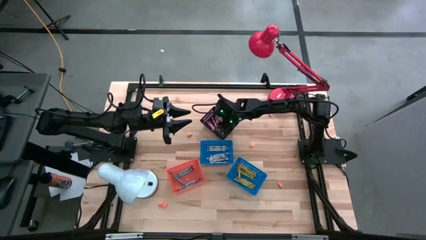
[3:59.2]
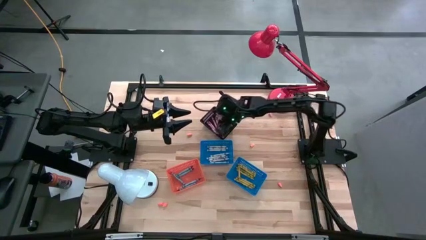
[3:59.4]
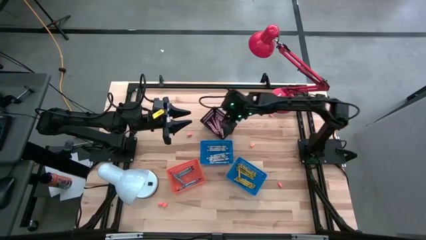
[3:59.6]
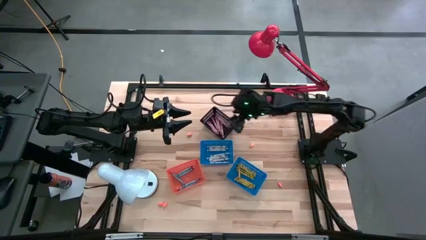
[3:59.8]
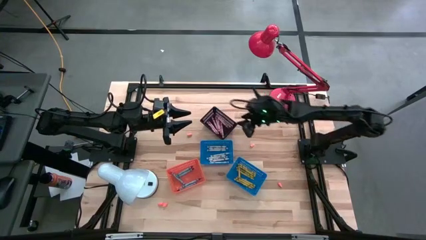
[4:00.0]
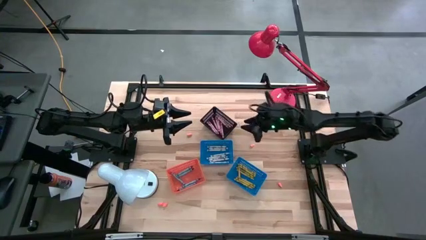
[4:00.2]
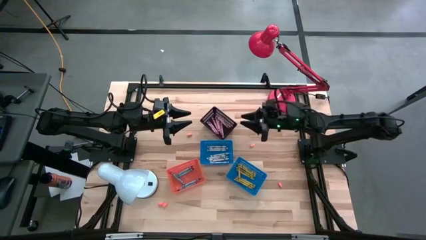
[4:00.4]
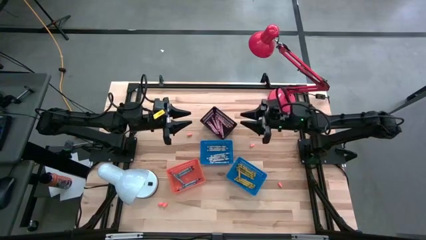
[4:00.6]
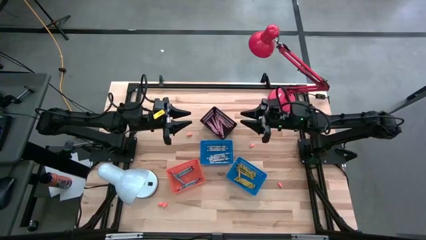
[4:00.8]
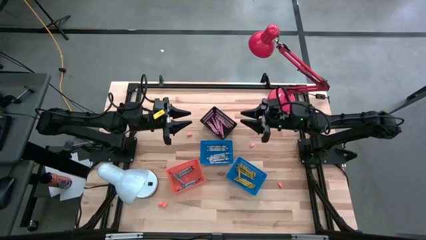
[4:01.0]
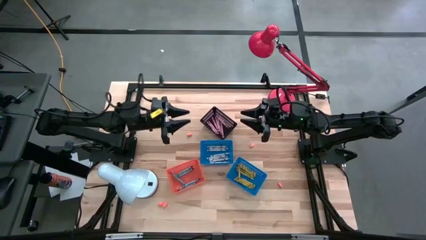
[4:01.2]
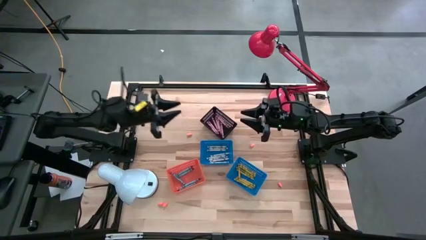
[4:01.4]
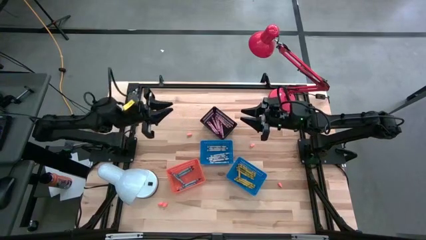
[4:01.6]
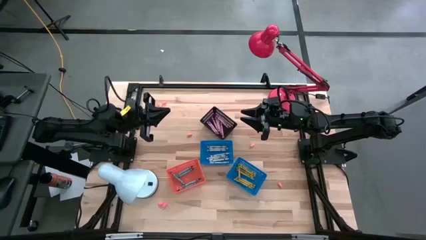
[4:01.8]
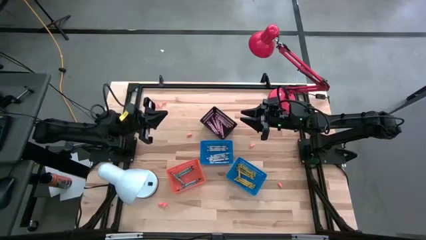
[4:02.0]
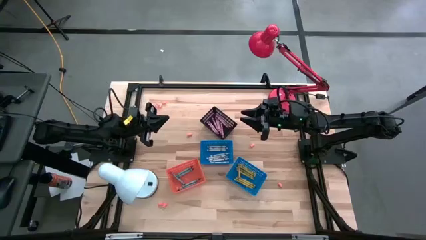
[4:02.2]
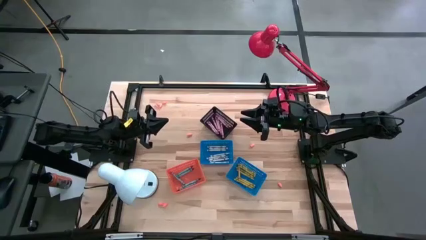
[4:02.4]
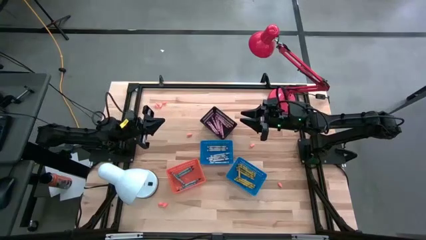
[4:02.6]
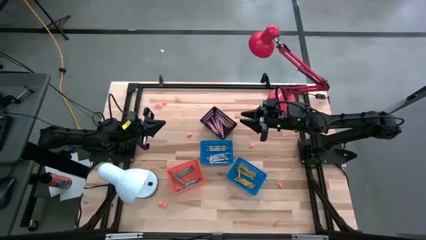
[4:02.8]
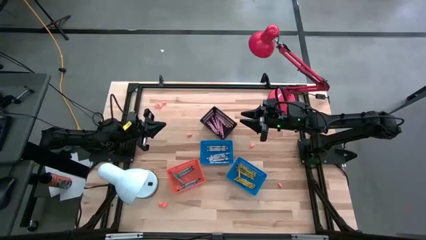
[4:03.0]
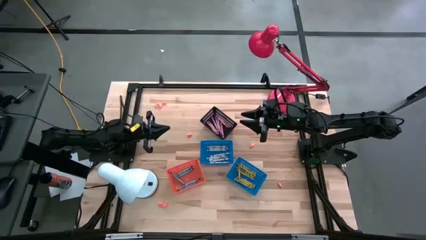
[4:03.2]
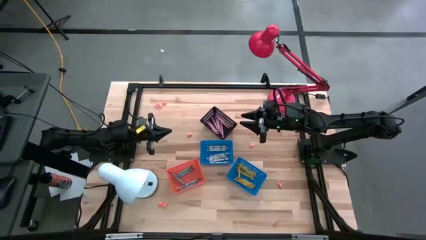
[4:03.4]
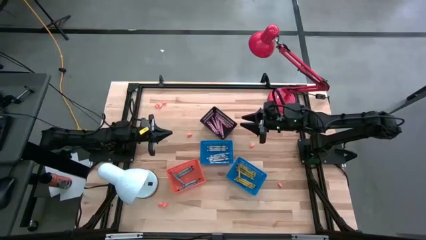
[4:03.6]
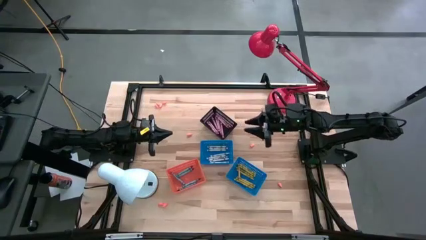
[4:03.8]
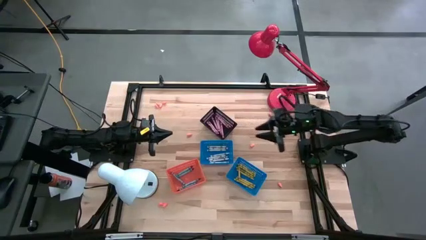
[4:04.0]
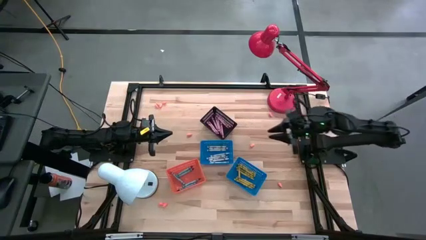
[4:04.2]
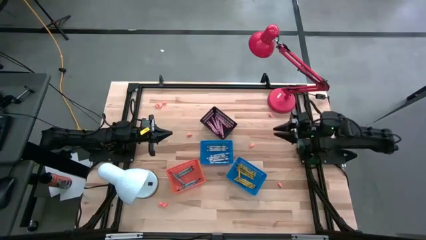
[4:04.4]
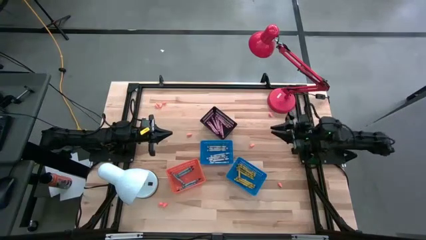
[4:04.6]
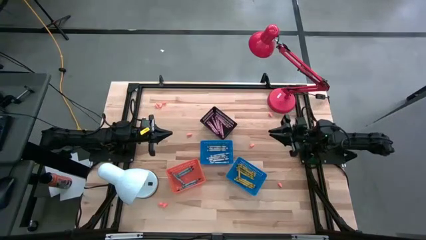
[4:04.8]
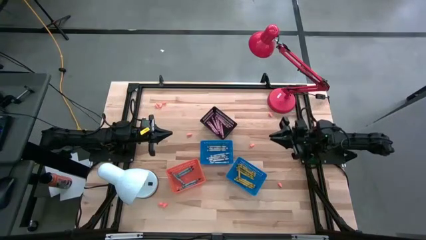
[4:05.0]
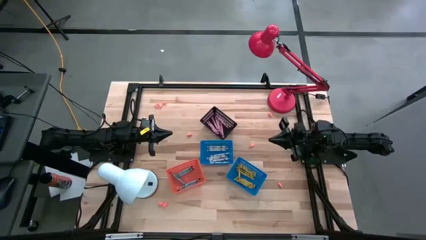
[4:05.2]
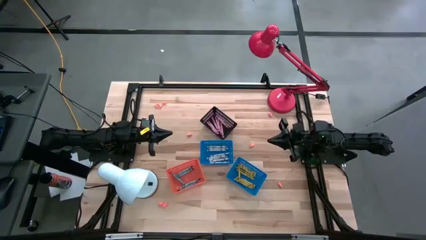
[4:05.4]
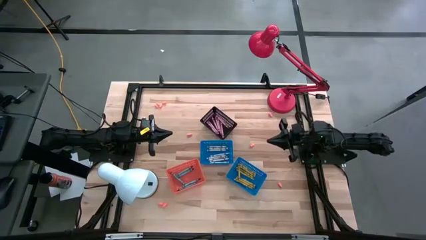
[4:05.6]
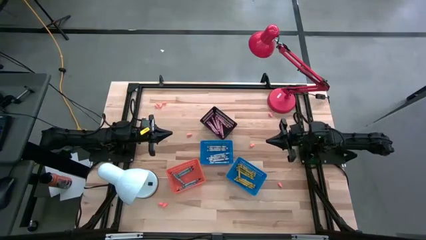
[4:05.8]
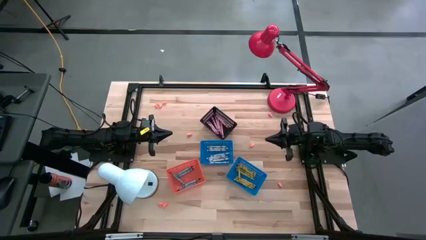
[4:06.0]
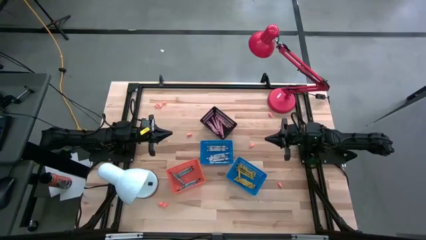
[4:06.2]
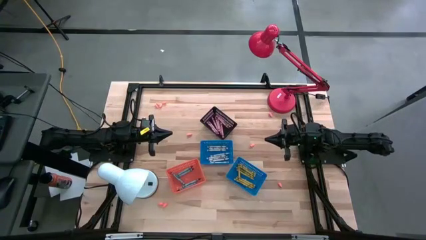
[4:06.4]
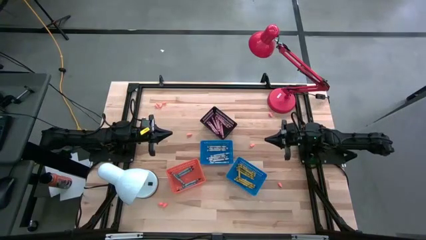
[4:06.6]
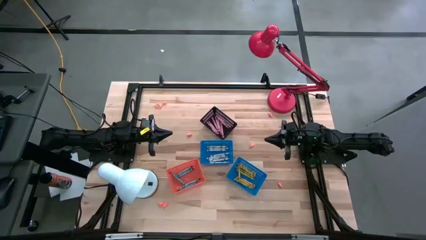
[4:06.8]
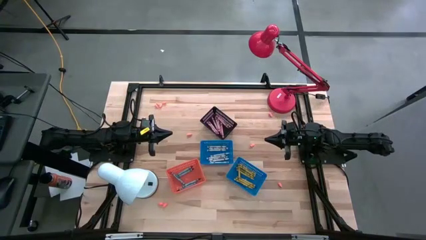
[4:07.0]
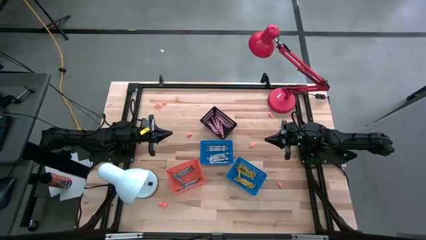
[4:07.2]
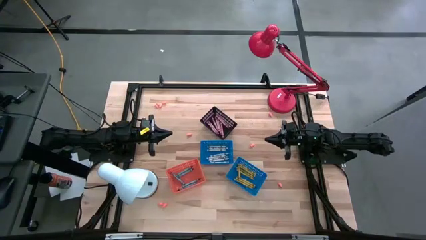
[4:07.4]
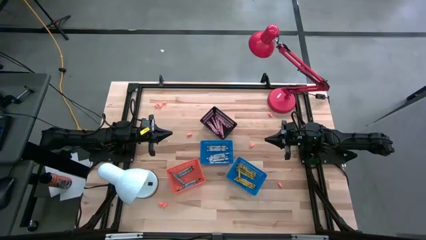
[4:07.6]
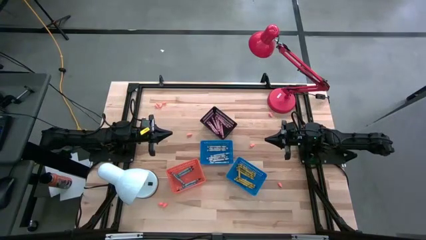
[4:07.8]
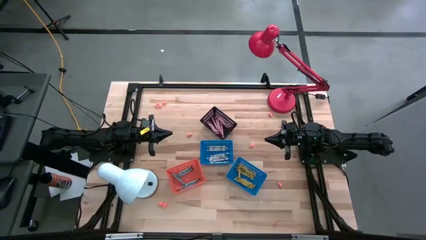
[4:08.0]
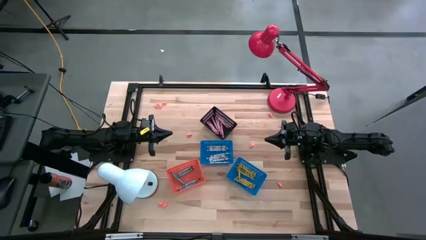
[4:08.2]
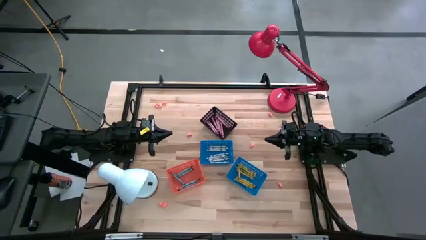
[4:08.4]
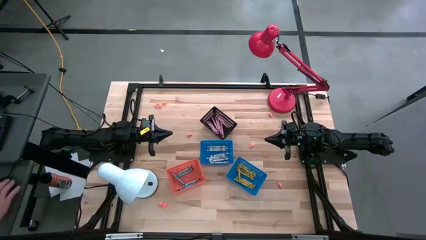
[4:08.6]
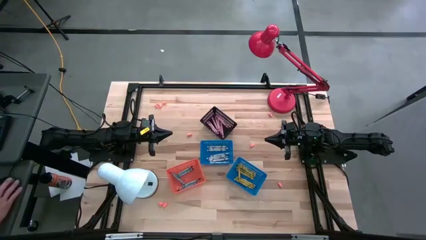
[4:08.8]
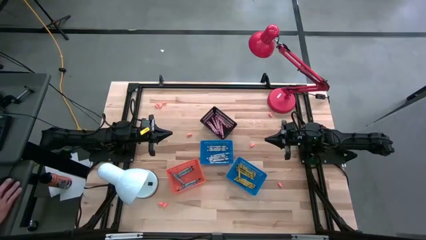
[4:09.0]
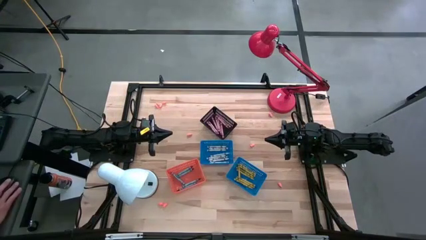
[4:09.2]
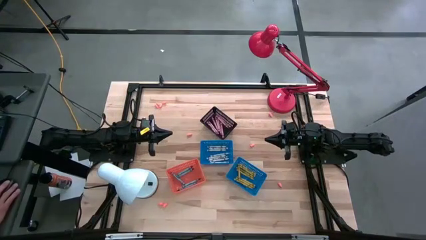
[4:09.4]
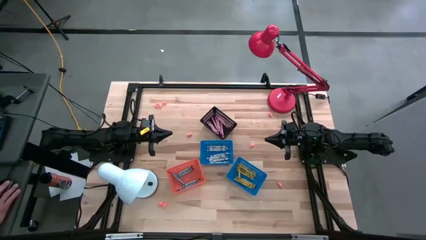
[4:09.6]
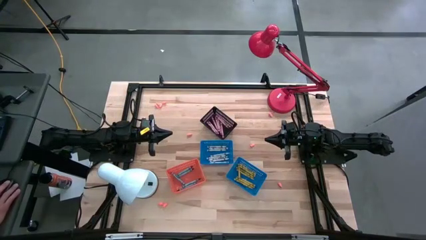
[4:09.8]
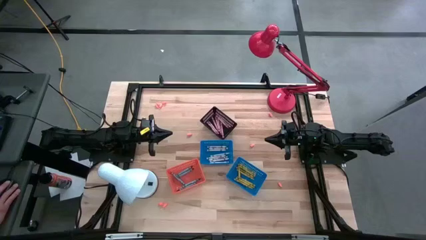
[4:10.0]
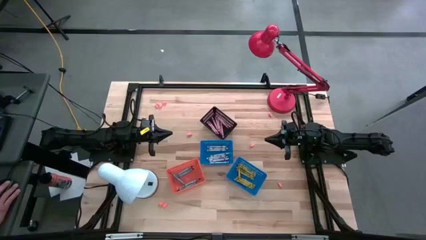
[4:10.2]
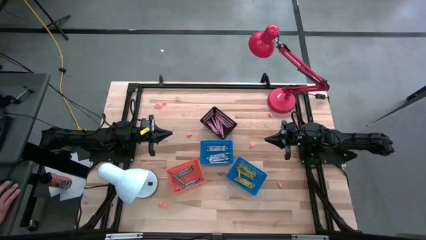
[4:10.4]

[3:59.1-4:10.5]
Task: Sort crayons
Return to Home Position

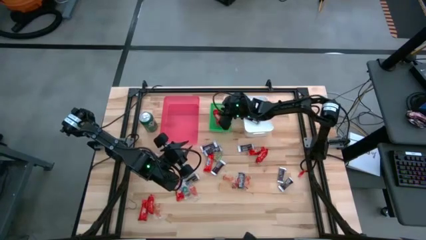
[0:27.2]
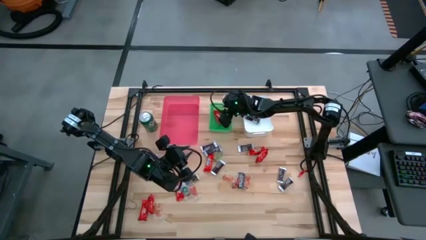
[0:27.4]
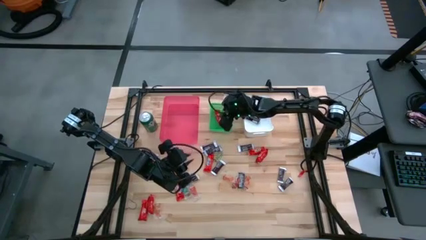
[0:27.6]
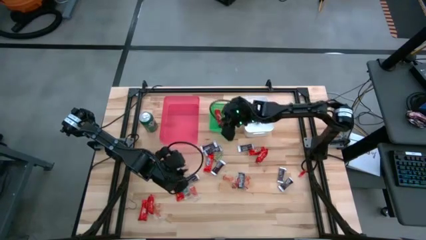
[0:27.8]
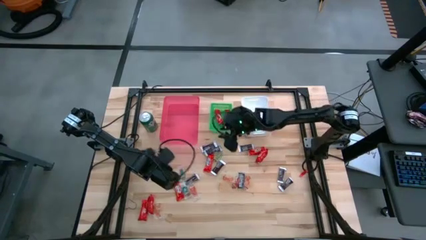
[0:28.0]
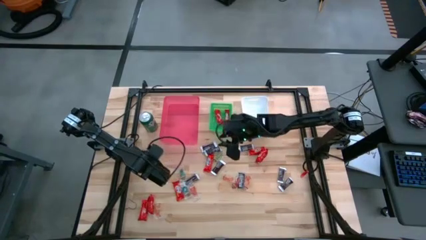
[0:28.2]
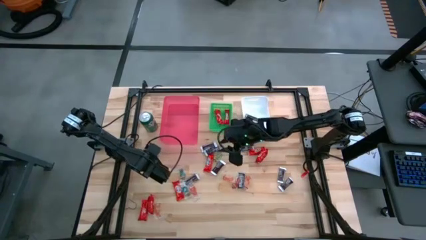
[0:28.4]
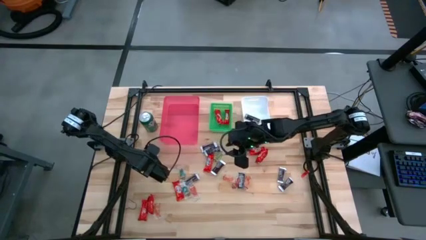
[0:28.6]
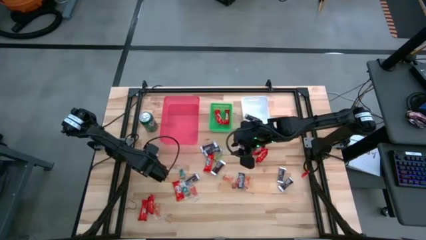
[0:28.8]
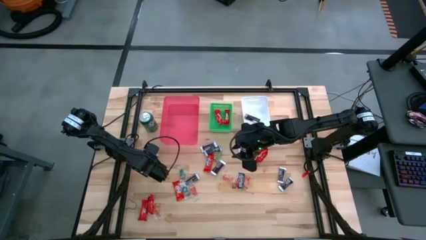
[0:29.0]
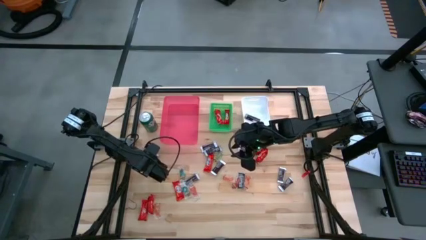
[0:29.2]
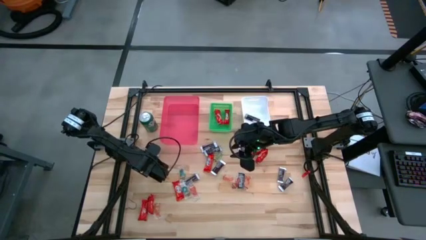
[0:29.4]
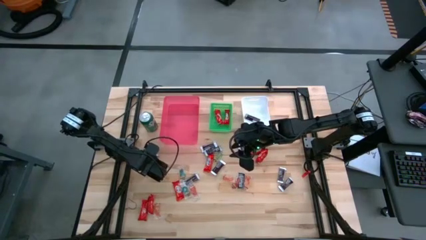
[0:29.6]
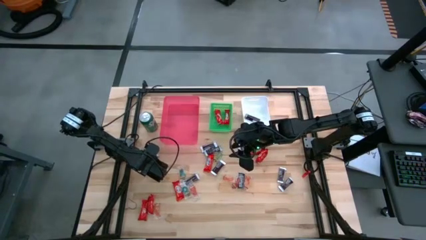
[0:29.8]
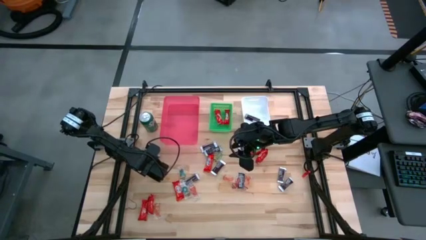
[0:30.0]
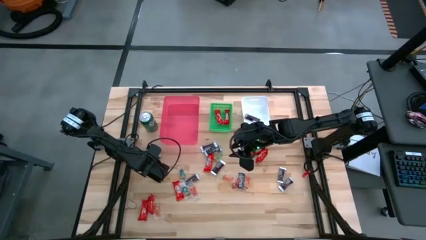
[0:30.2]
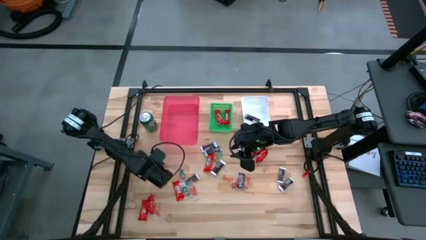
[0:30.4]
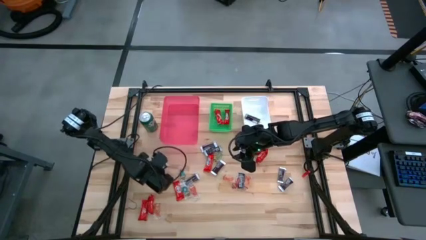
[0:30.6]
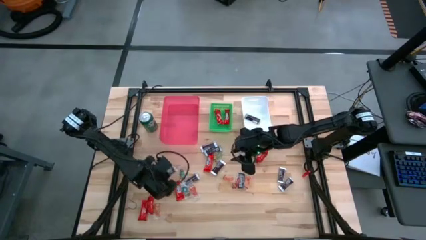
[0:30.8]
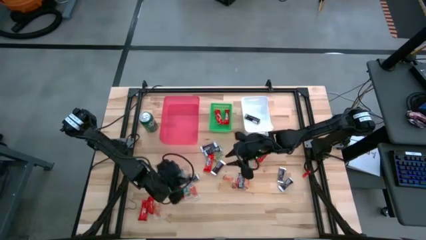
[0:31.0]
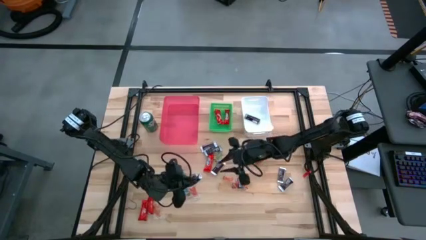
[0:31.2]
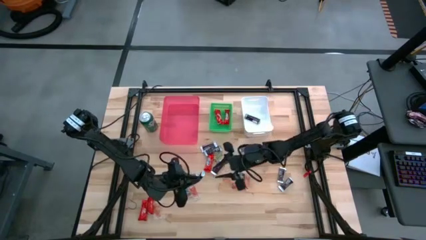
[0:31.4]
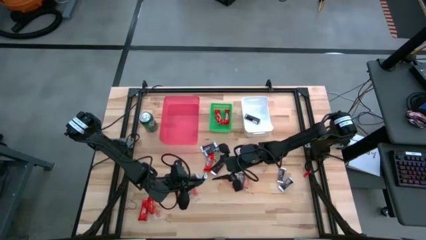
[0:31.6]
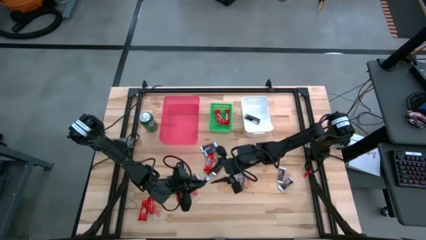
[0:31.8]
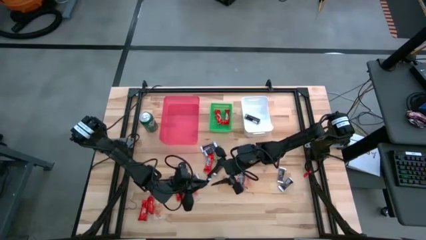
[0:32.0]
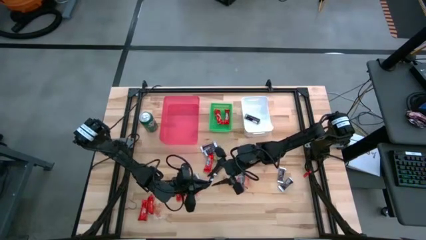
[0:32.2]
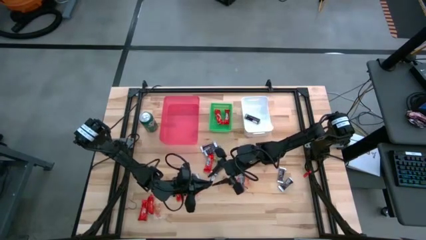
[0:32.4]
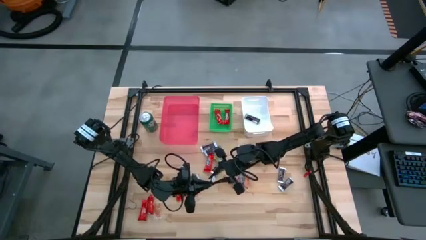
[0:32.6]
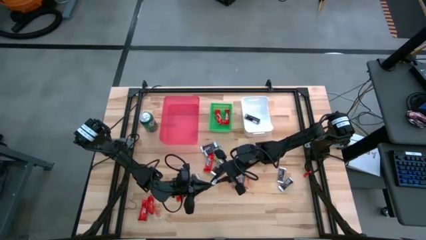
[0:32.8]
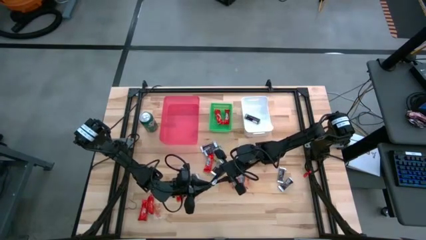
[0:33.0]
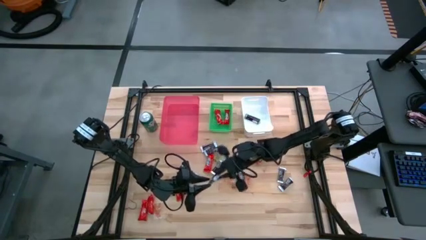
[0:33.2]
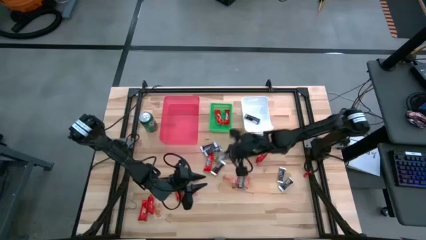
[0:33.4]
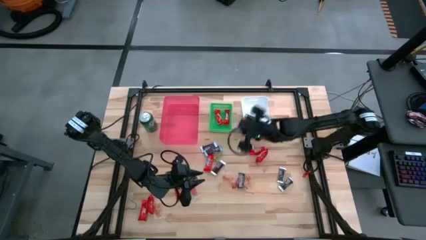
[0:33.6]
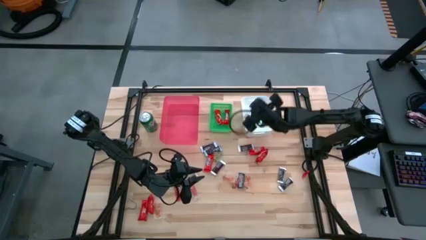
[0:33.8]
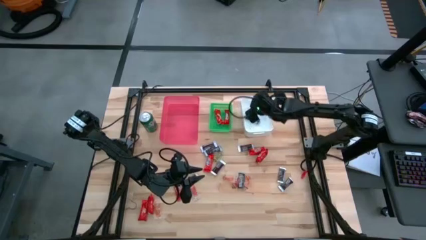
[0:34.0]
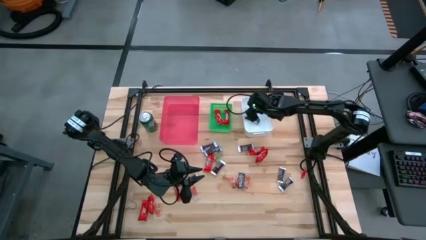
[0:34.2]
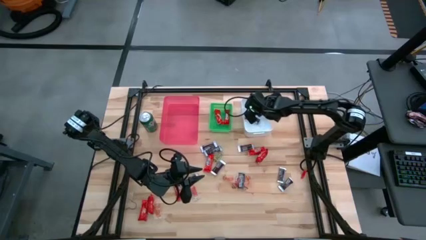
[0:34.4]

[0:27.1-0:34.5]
Task: Sort candy
Put the brown chocolate into the white bin
